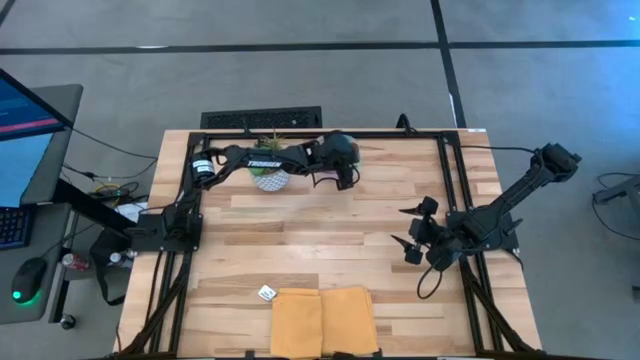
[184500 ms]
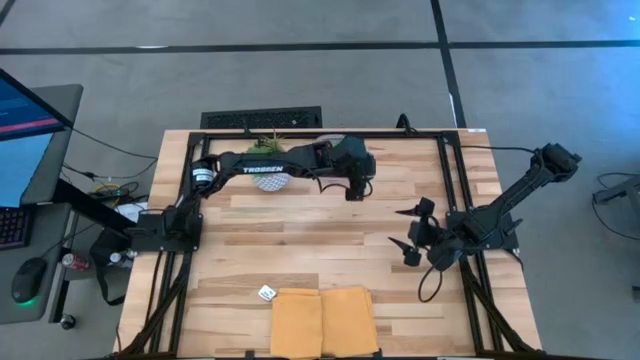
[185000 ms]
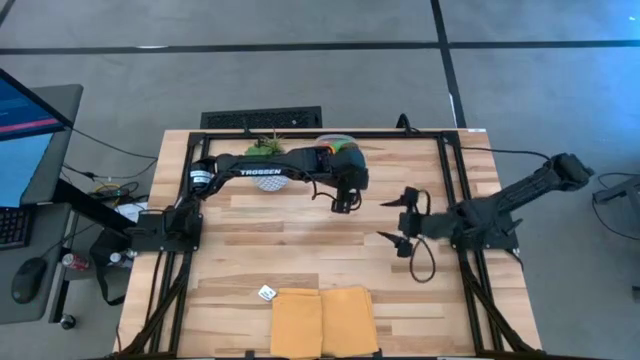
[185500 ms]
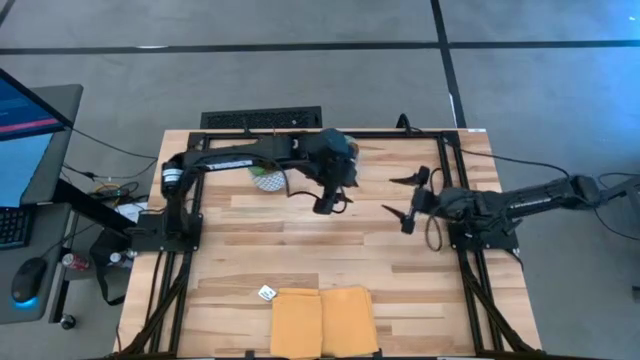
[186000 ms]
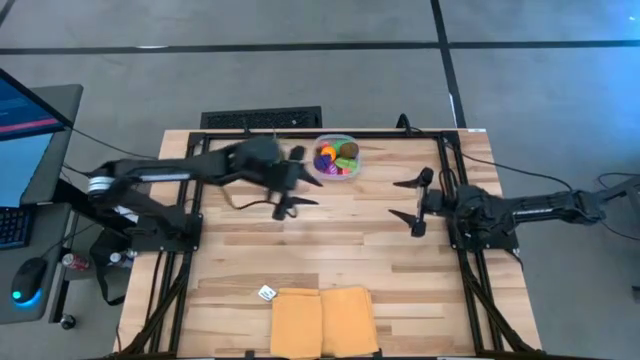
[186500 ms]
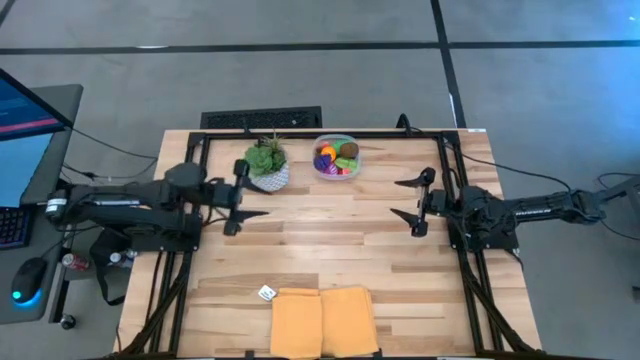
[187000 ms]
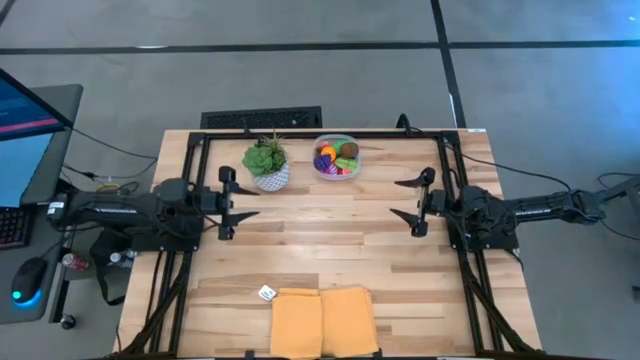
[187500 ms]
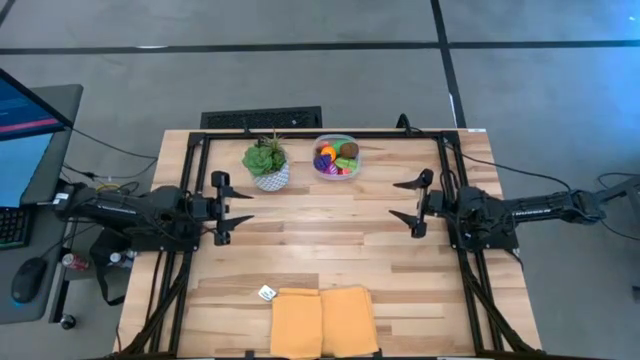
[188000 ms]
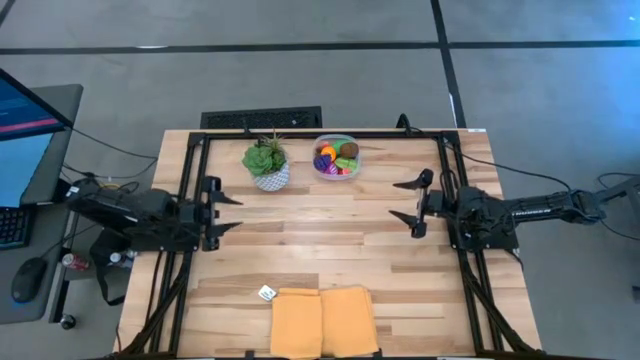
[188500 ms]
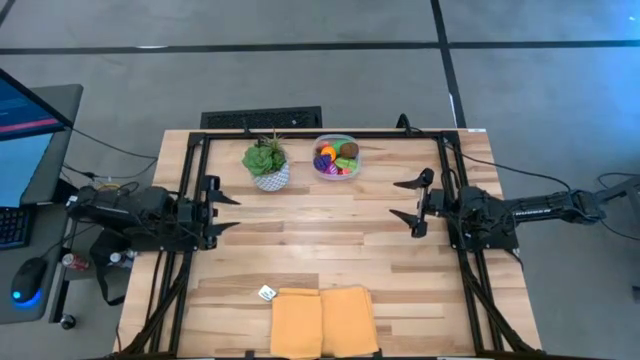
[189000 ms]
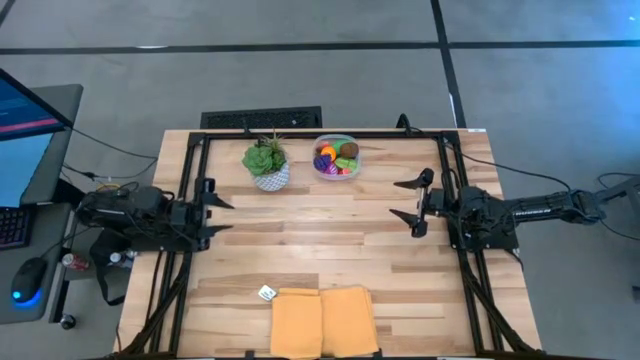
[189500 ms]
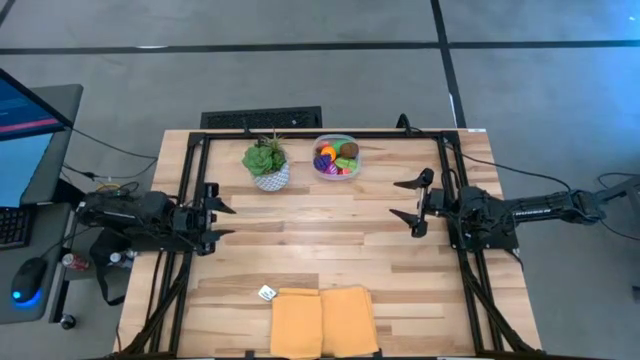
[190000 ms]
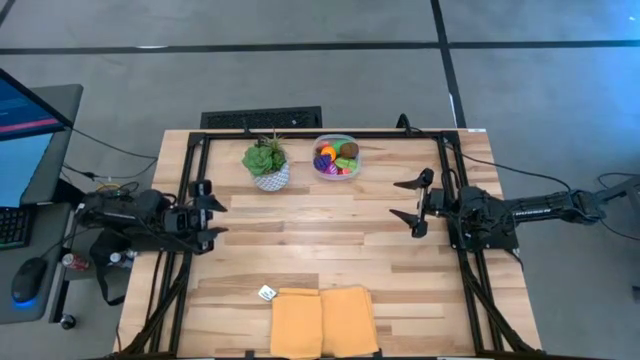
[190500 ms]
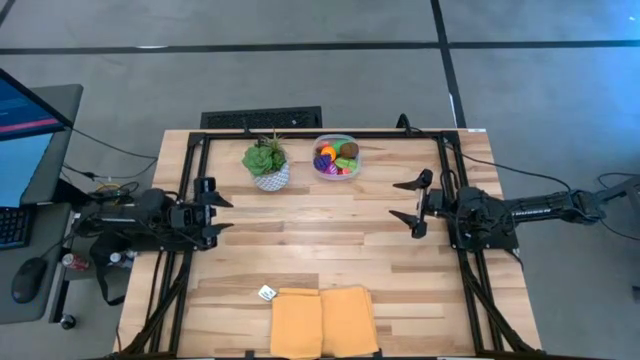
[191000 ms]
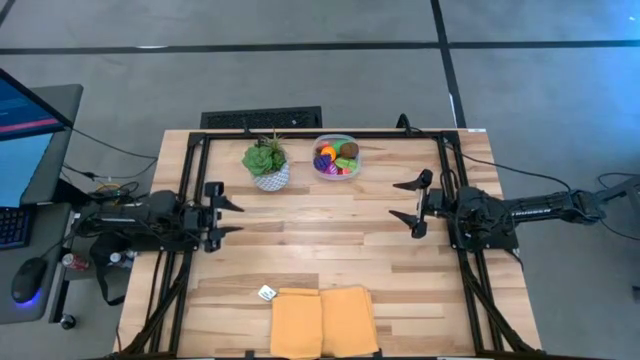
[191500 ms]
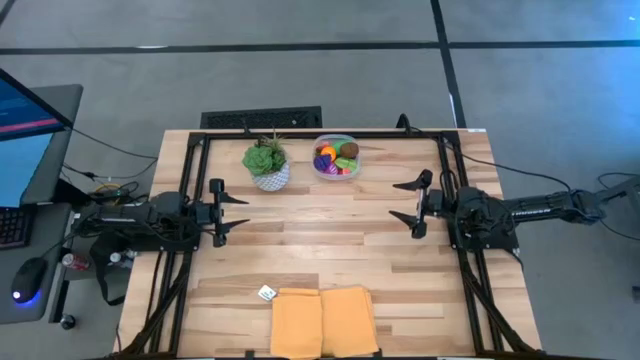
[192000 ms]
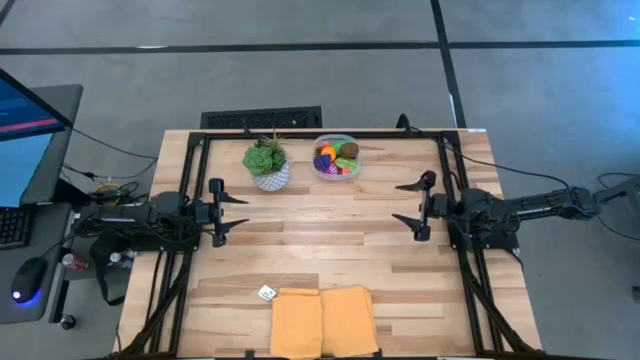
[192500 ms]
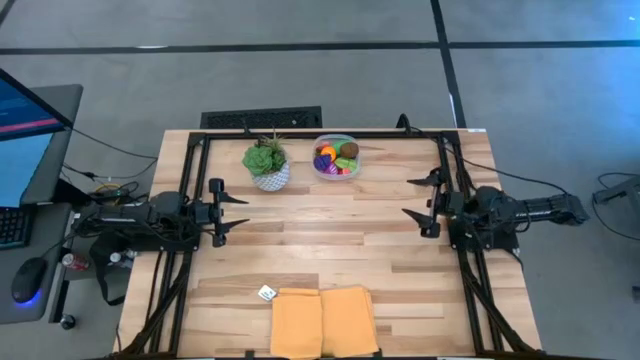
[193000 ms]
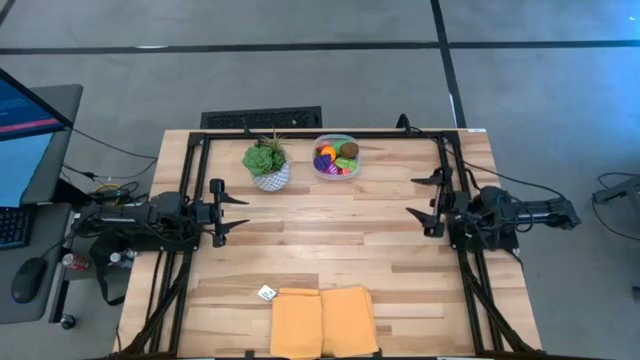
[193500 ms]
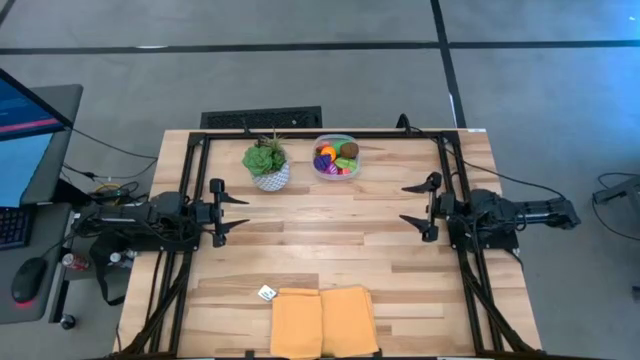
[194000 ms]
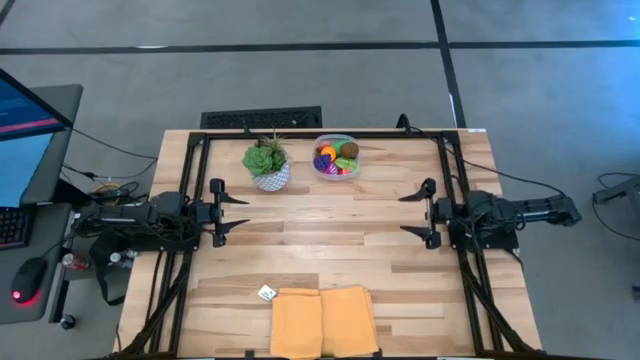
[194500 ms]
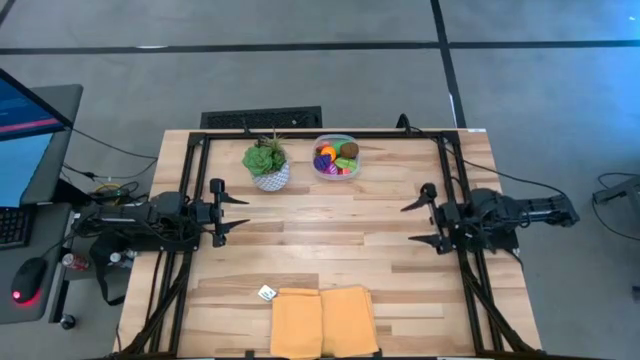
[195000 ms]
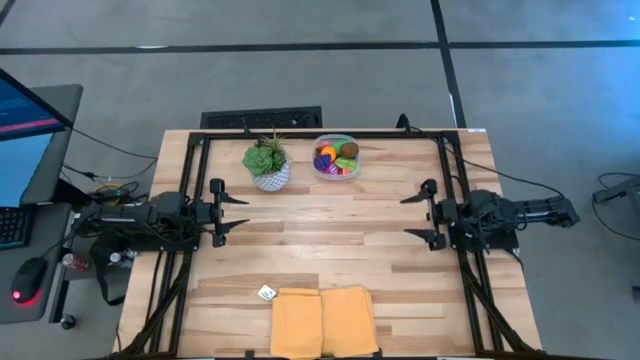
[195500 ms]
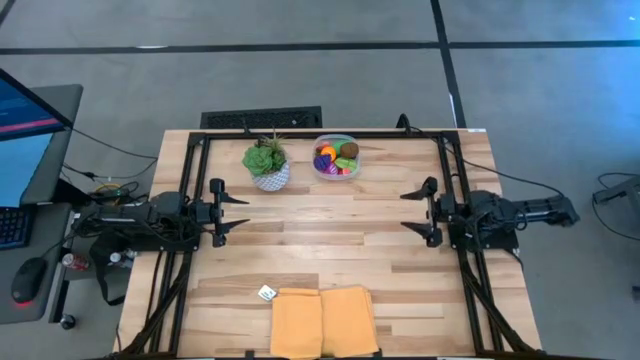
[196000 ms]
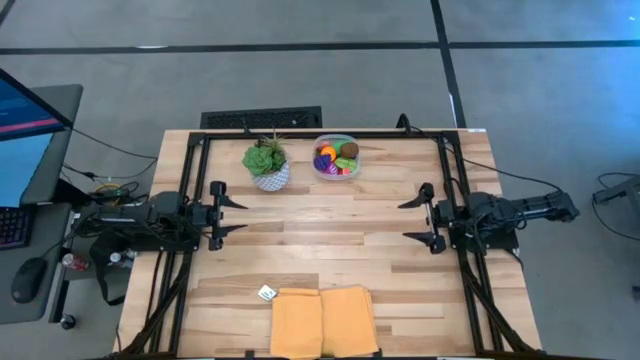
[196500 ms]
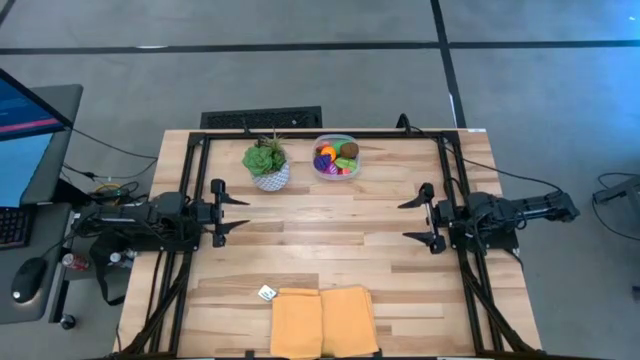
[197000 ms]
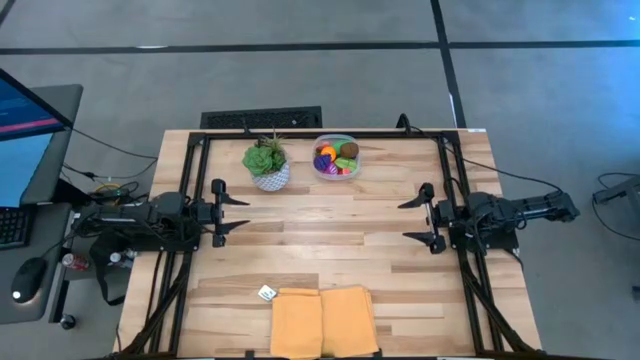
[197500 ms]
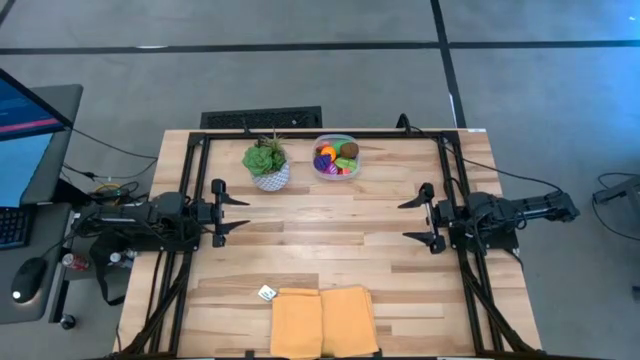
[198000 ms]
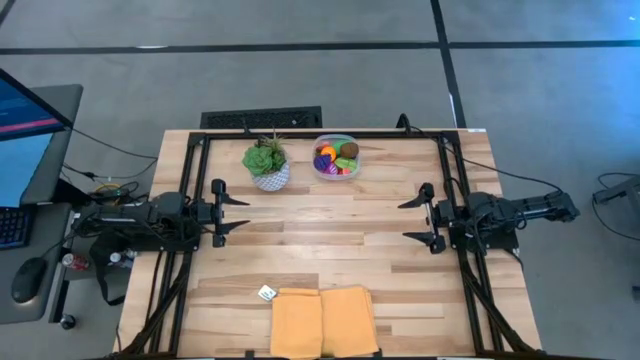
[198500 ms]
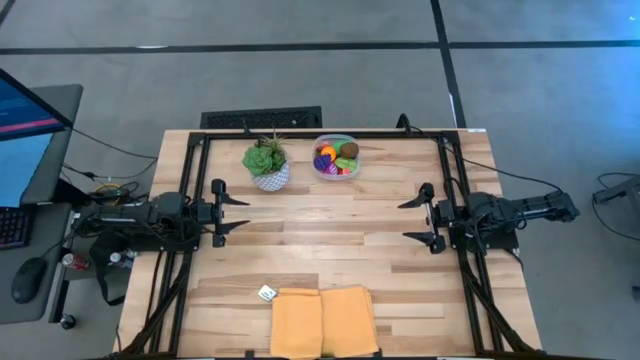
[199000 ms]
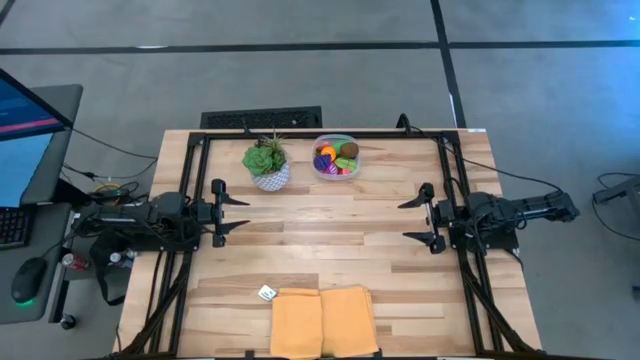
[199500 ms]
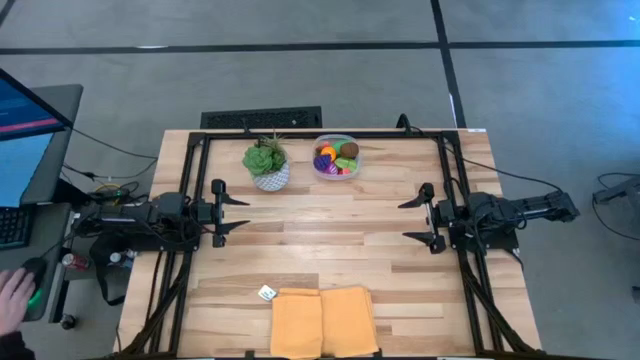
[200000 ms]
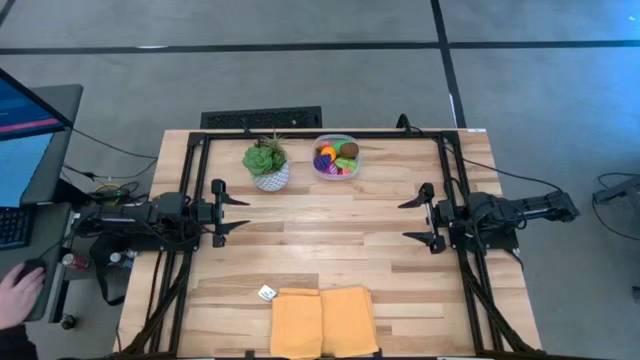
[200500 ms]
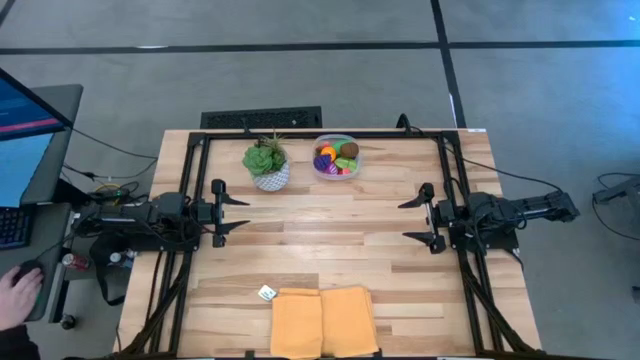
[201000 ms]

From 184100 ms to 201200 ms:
Task: Pick and placing Produce into tupperware
Return to Home Position

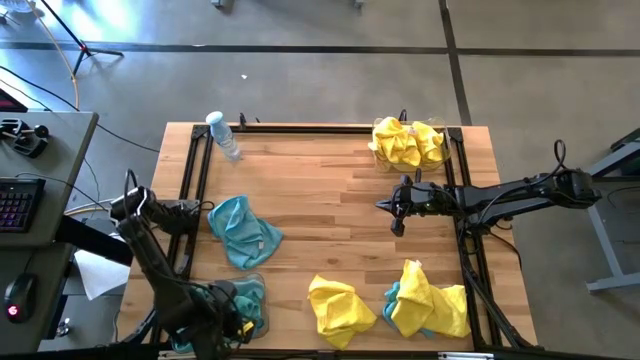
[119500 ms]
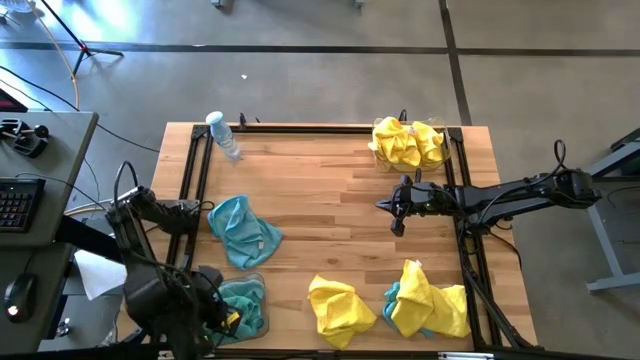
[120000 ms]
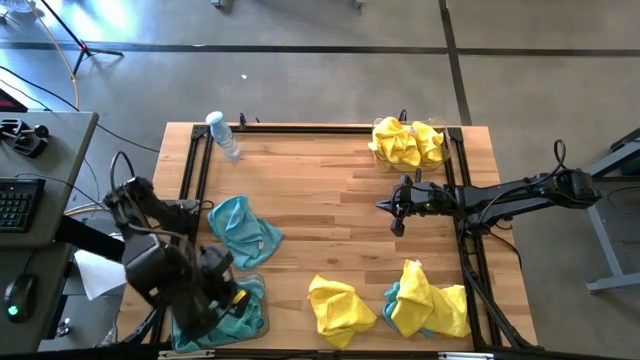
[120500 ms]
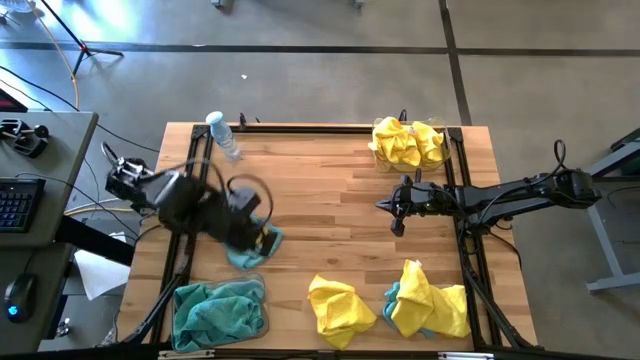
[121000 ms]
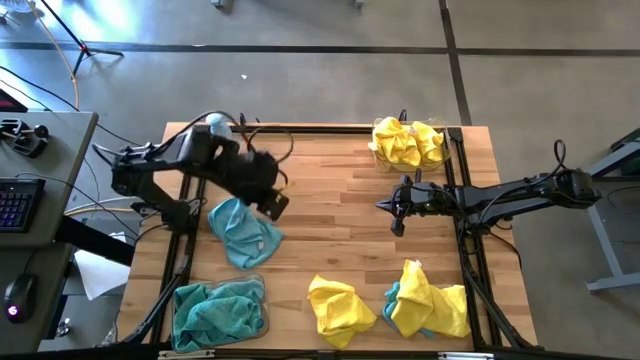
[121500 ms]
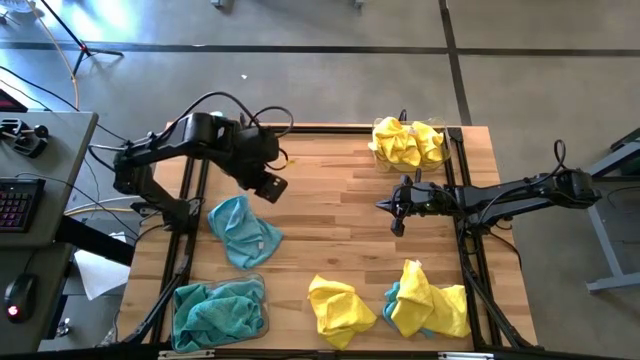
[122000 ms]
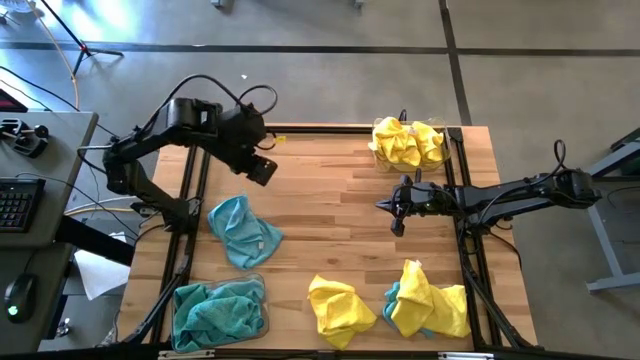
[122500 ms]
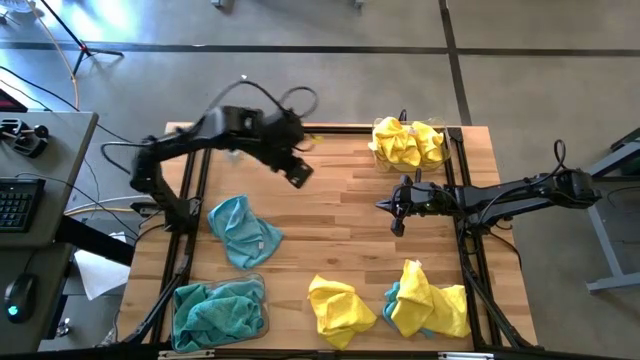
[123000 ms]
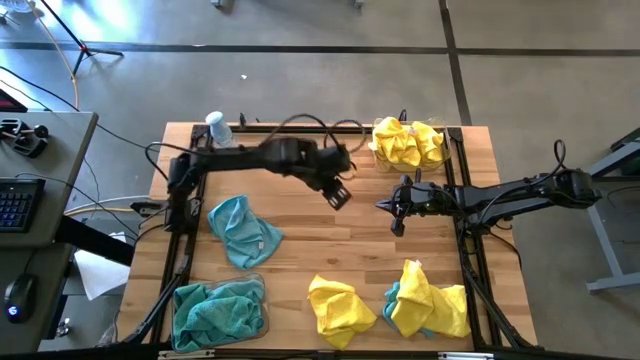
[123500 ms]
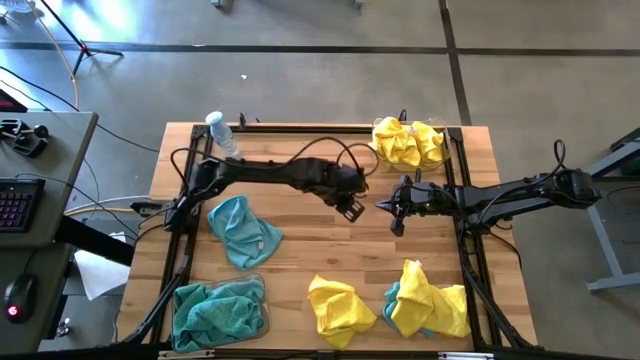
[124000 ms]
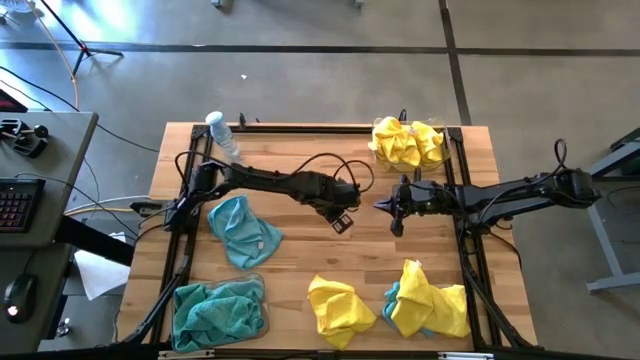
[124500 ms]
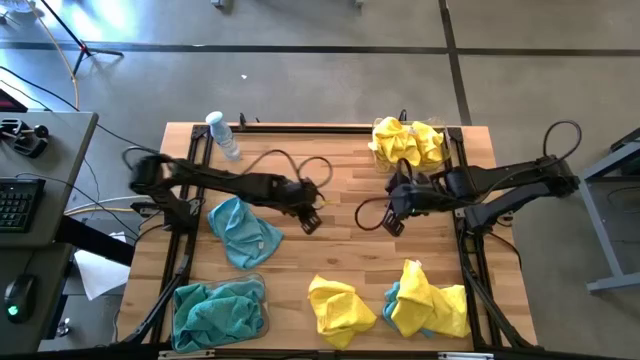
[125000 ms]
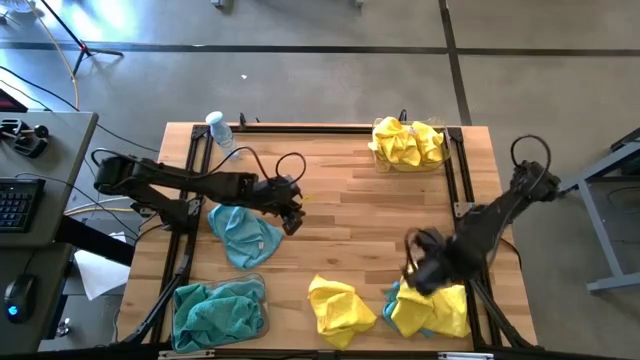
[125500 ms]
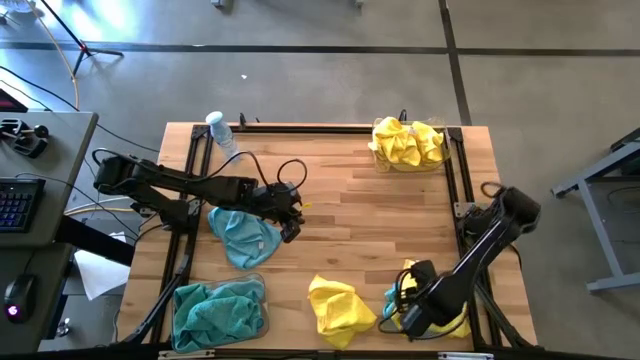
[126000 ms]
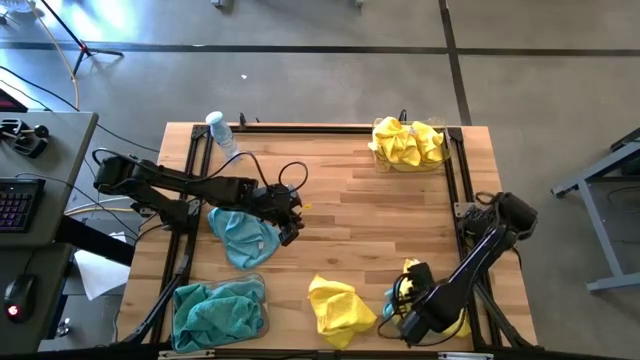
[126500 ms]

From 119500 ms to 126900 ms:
Task: Sort microfiber towel by color & place in baskets
Put the yellow microfiber towel into the top transparent bin
